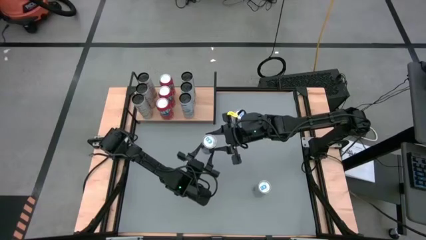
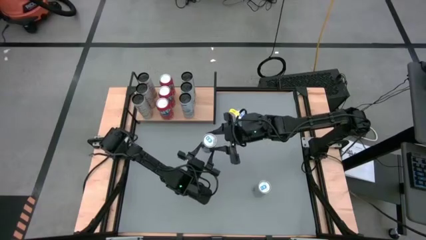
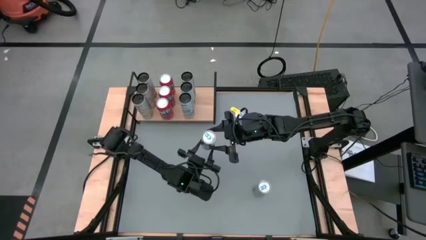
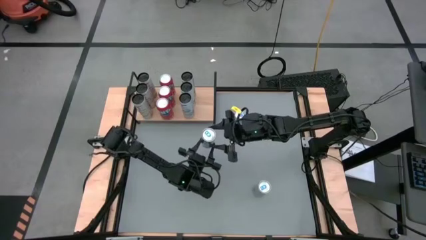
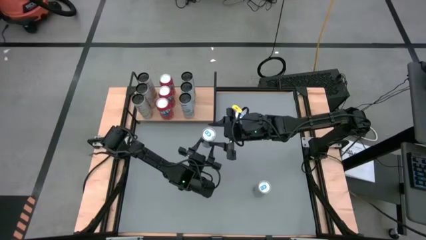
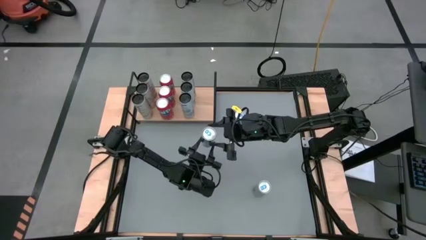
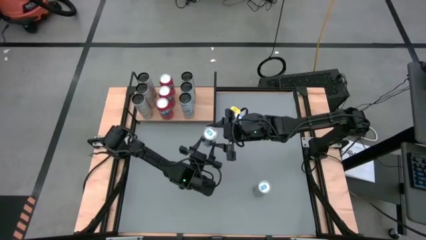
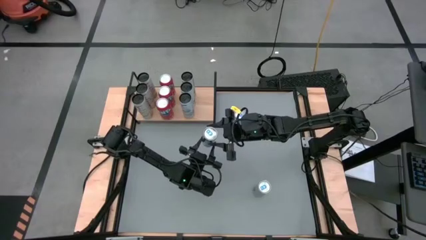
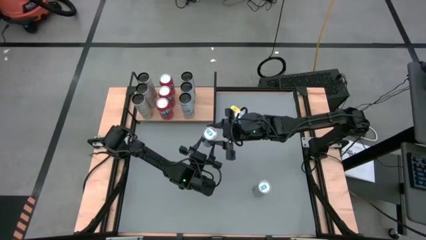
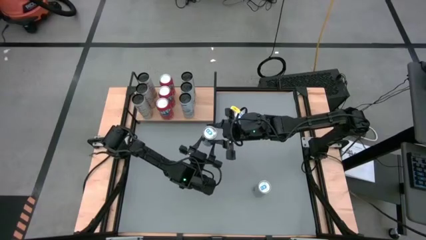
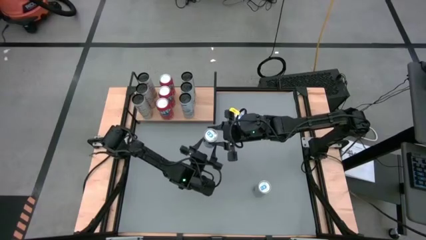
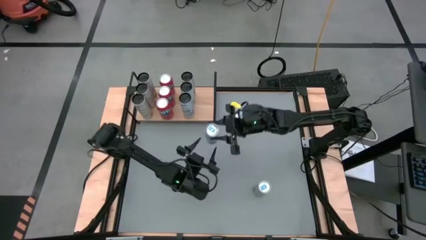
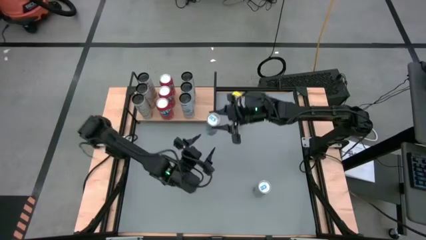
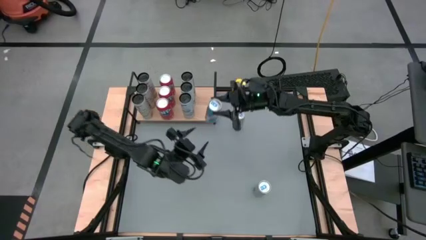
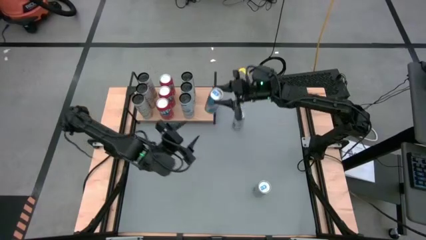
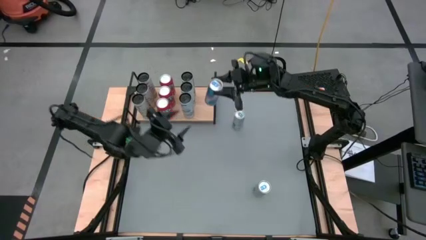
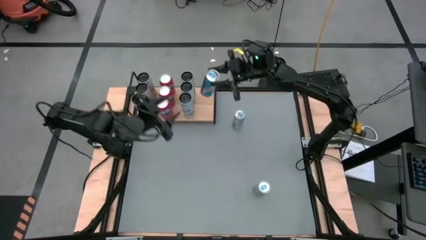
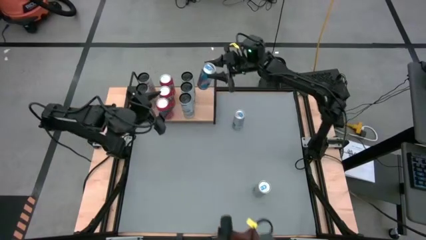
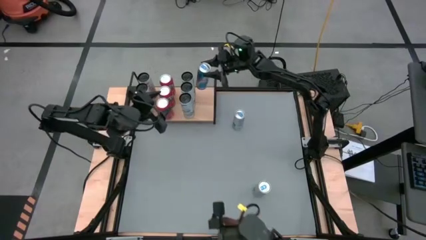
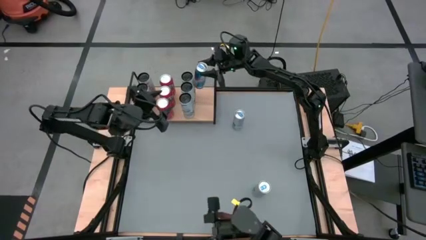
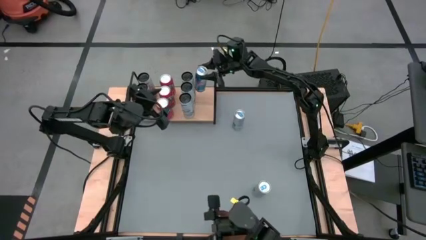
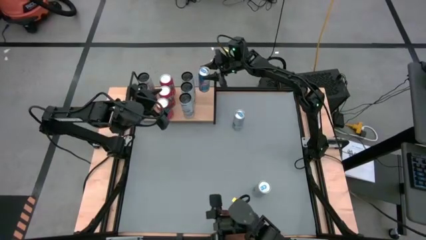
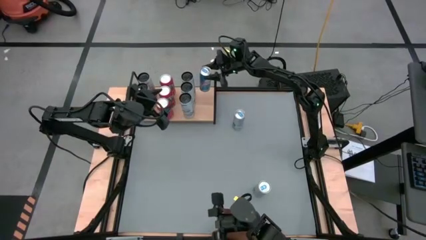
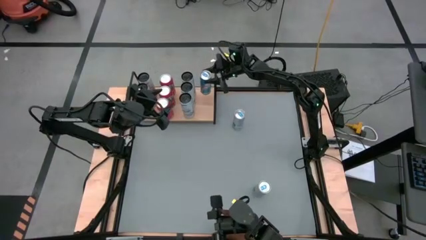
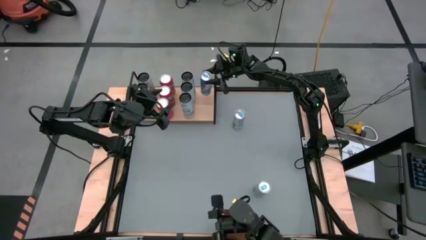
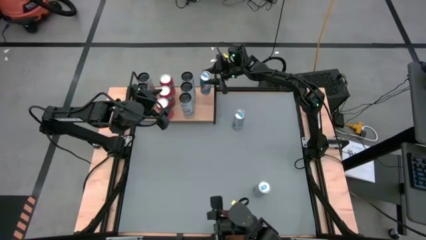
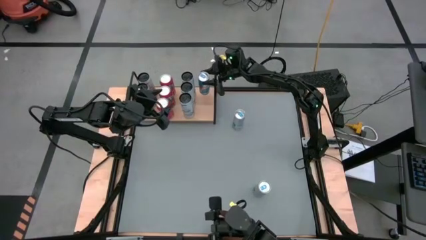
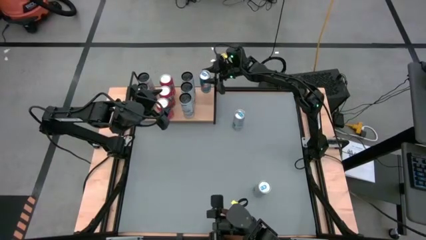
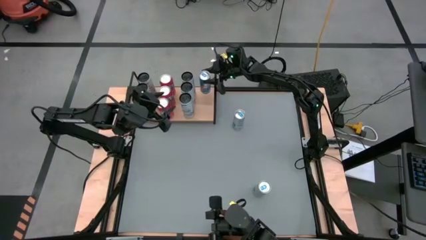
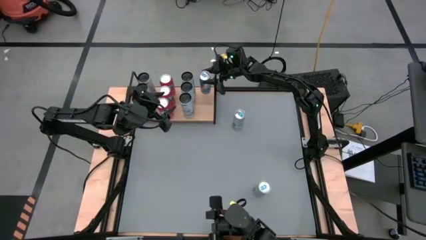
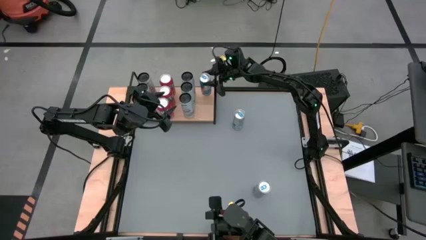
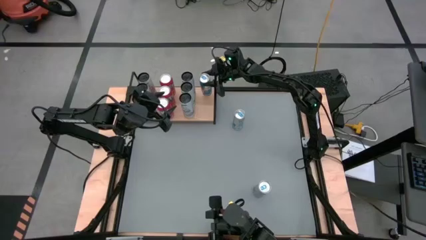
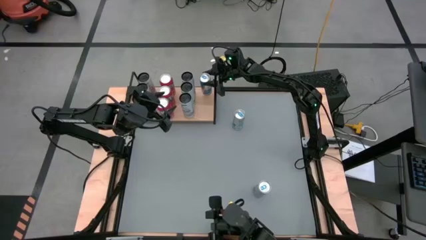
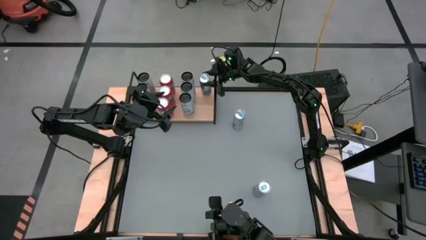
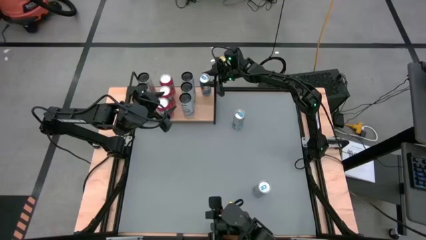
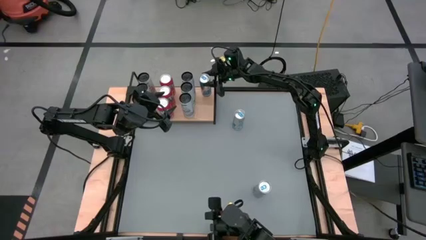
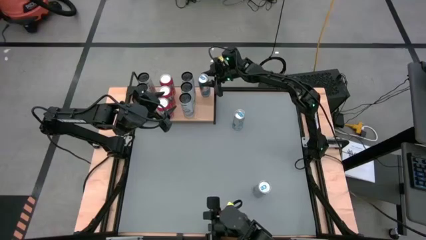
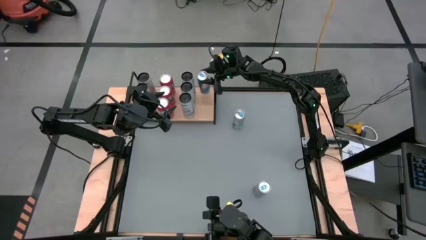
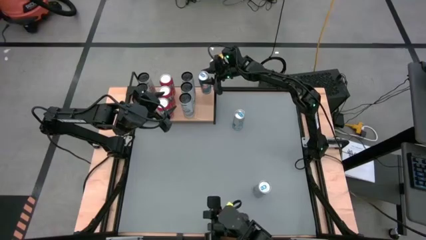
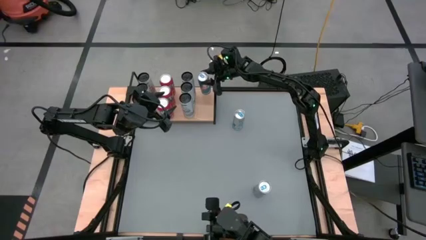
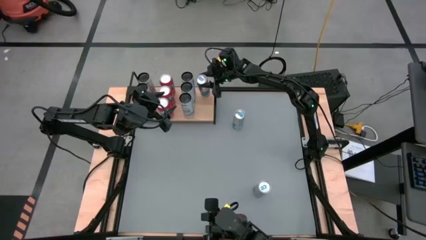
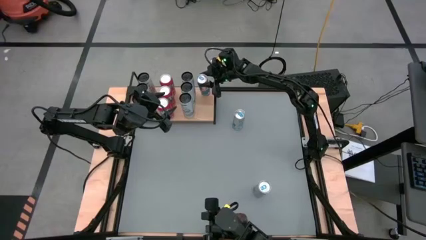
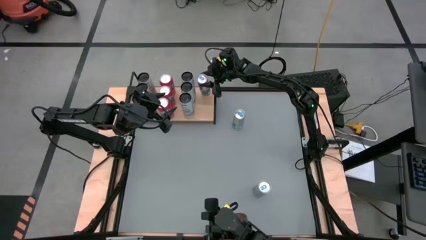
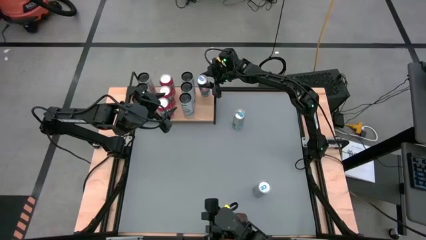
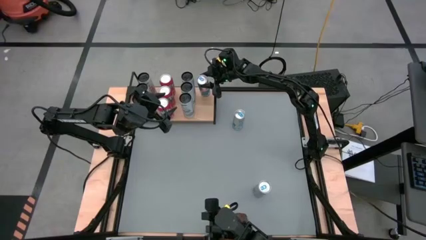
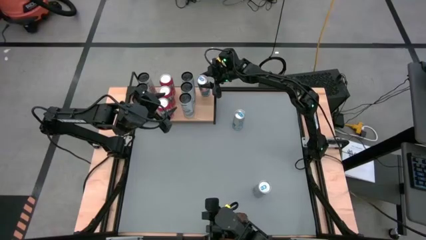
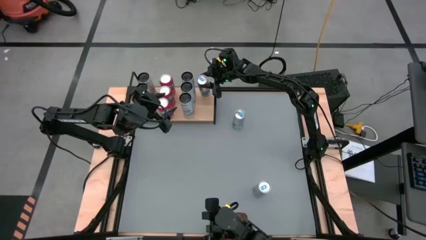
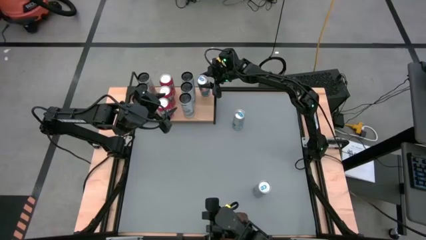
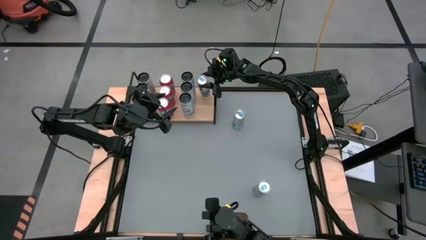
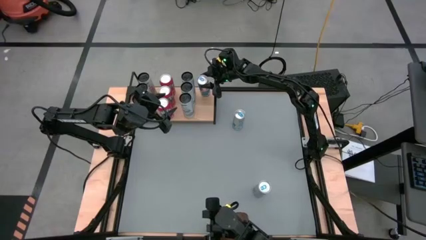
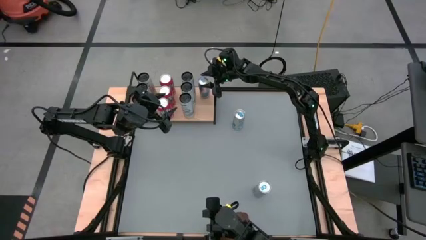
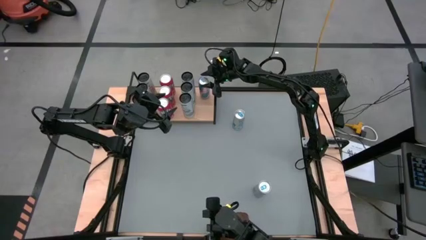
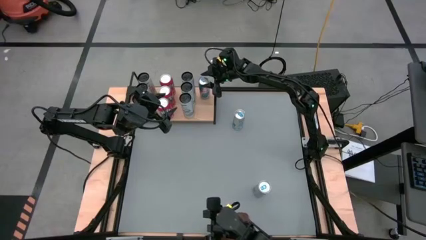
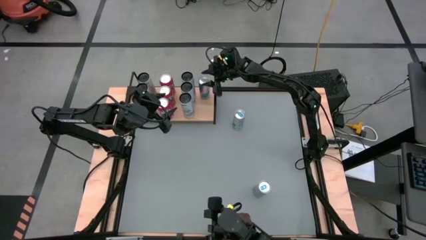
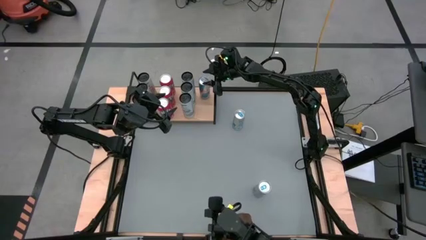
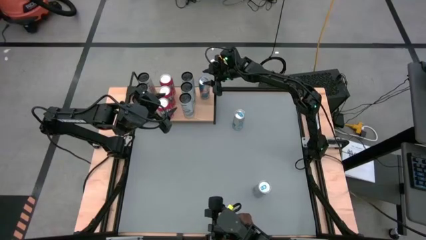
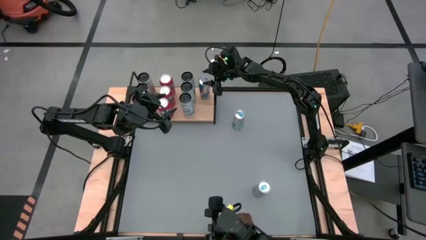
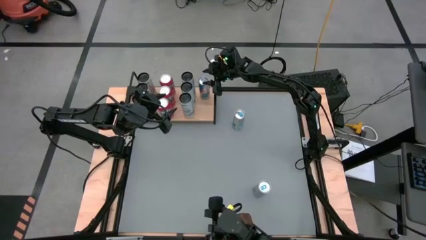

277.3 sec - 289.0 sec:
Task: Place canned beverage on shelf
Put the bottom left blue soda can on the shelf
